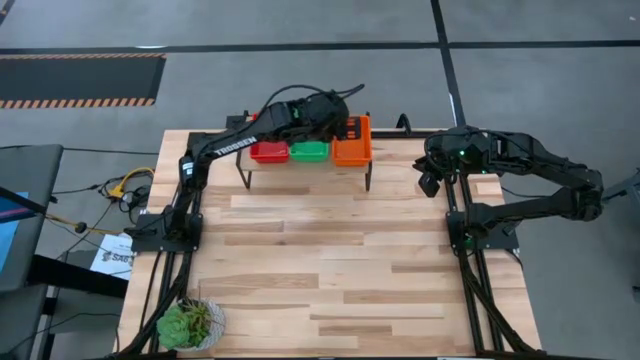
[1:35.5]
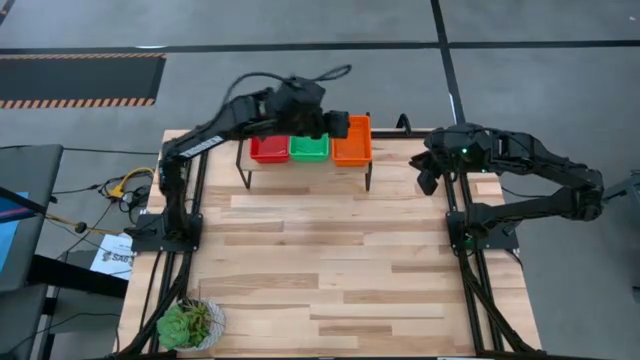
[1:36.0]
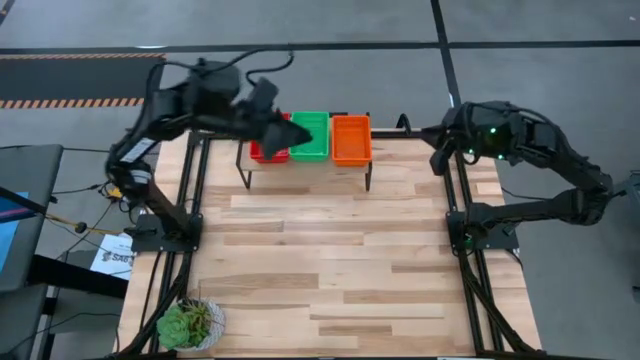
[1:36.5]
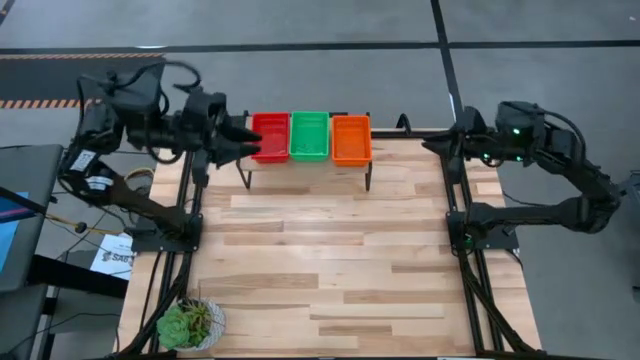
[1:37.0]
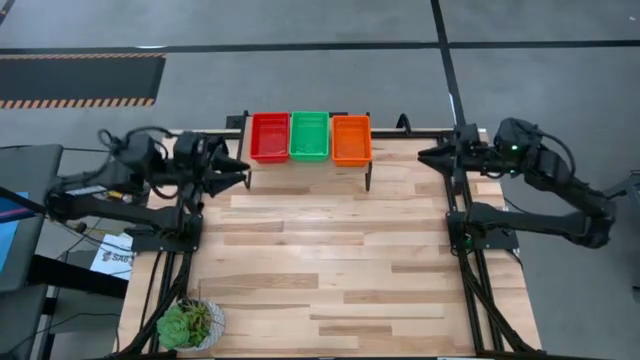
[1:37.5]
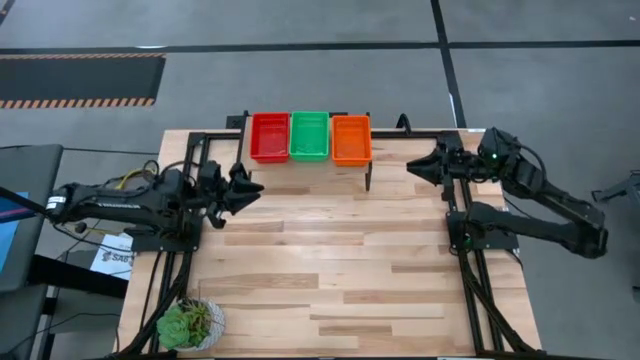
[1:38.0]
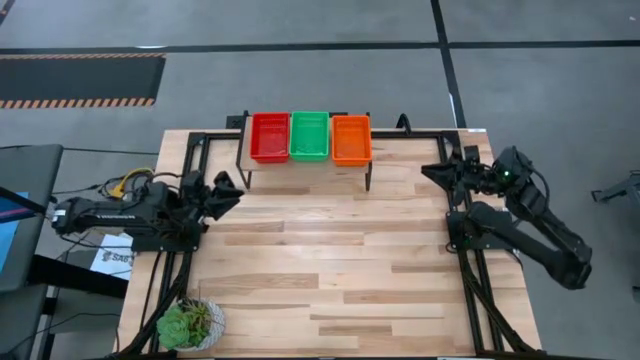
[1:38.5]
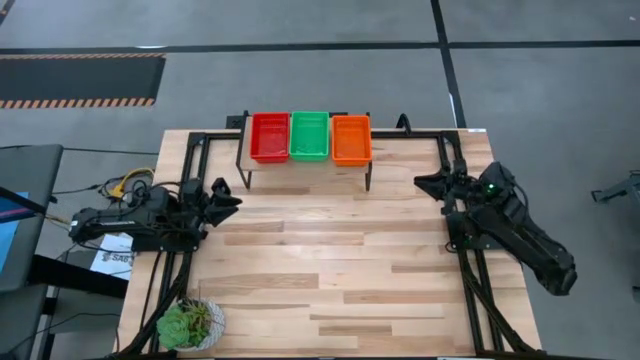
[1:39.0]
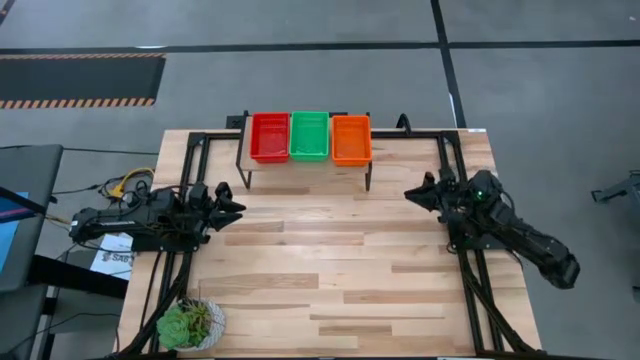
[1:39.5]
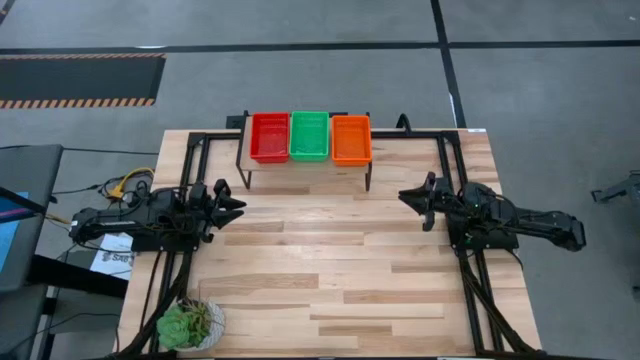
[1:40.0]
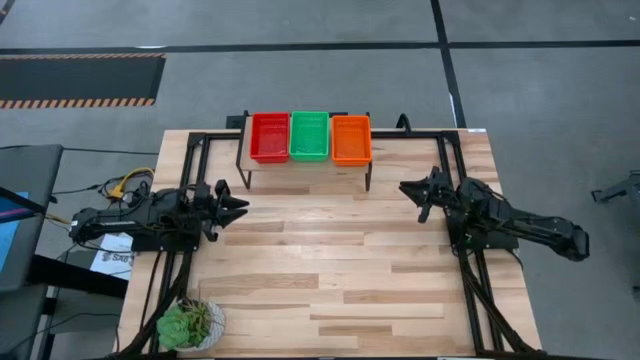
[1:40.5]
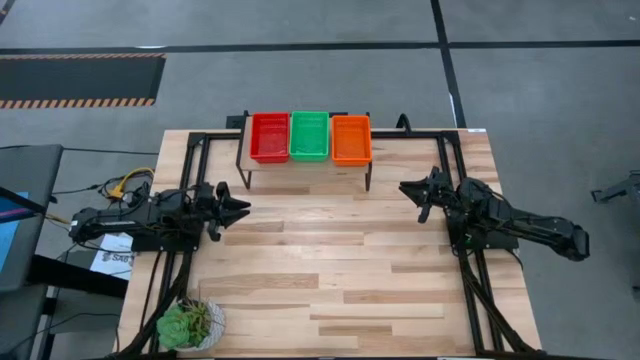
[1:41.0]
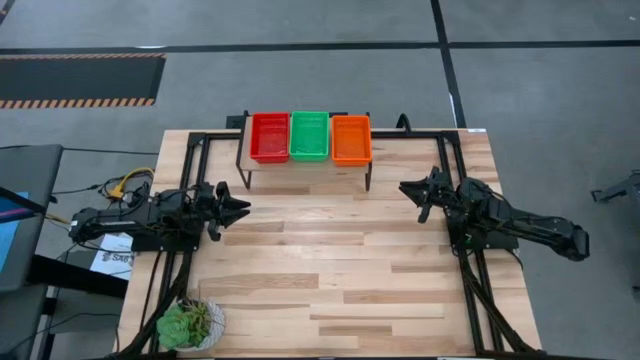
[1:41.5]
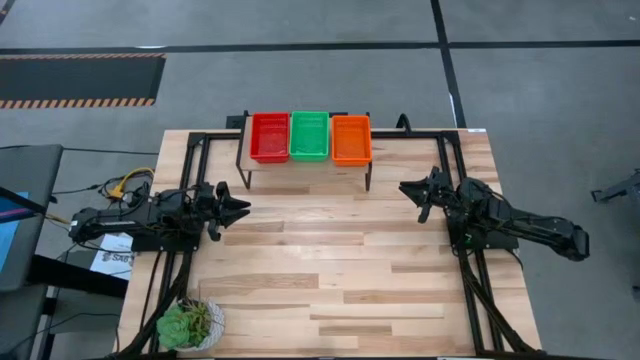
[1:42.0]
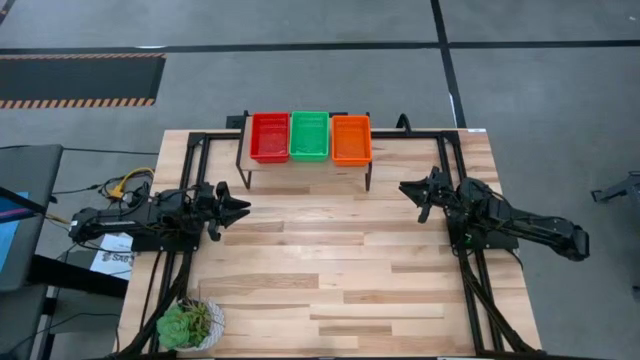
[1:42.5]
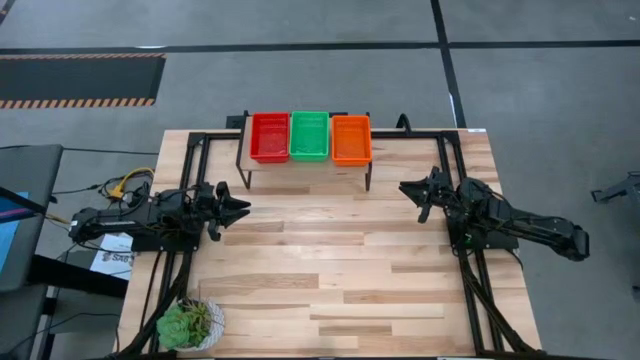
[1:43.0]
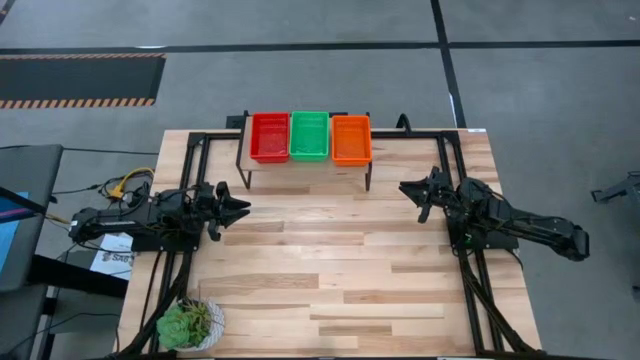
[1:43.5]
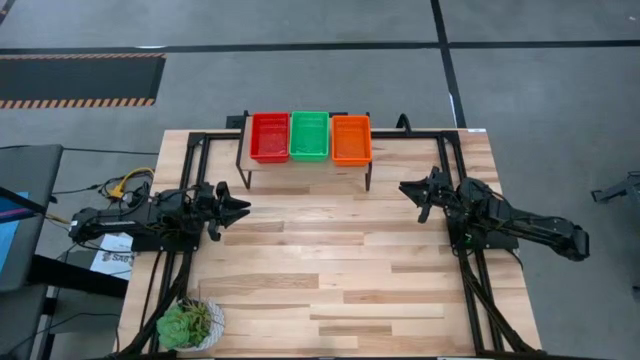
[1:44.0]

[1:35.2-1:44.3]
Task: Stack baskets on shelf by color
Return to Home Position

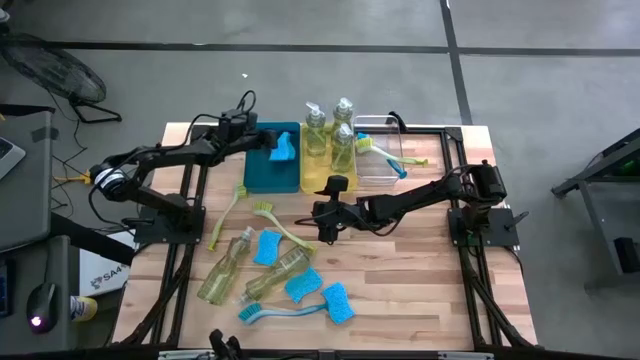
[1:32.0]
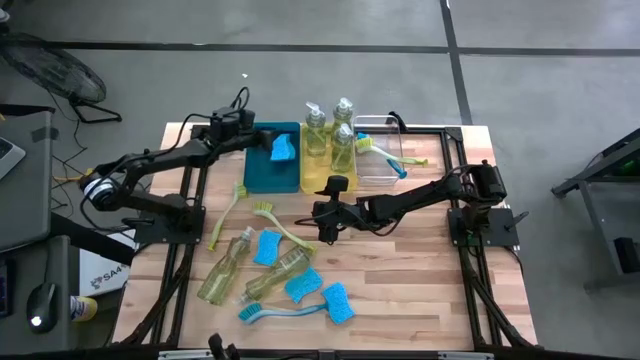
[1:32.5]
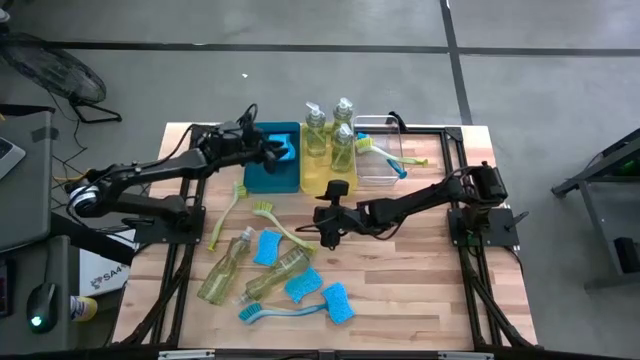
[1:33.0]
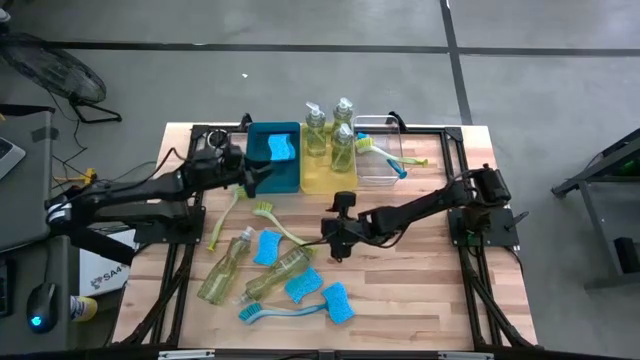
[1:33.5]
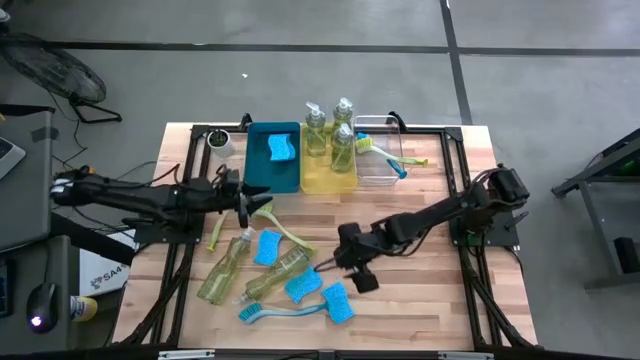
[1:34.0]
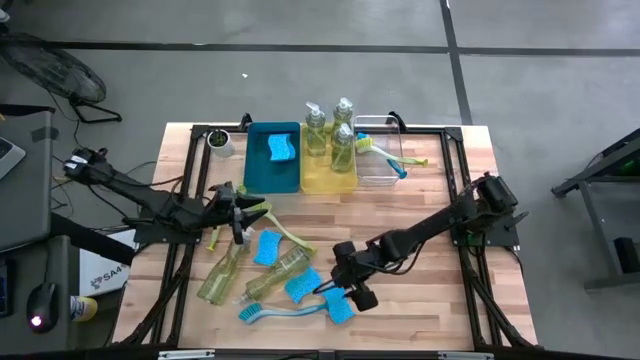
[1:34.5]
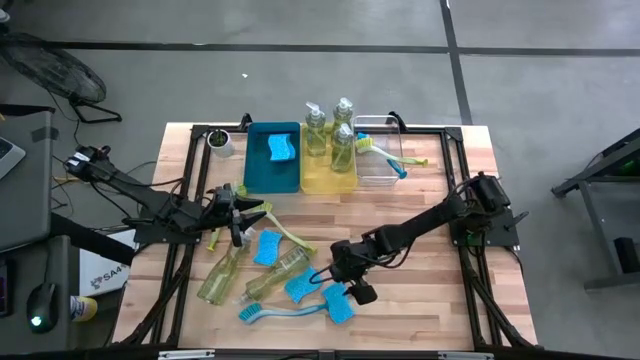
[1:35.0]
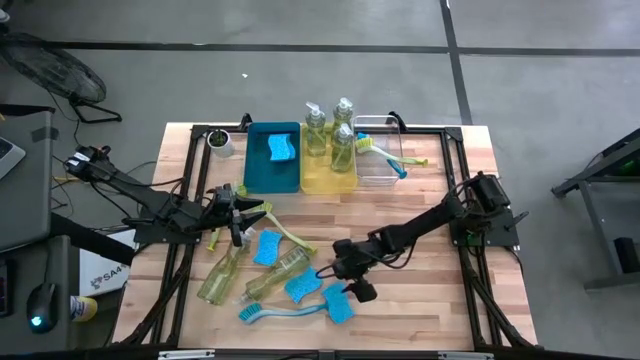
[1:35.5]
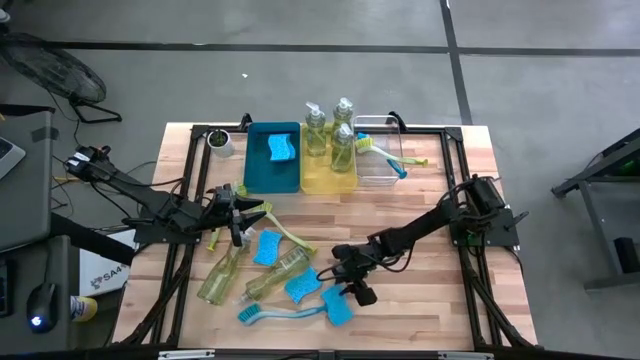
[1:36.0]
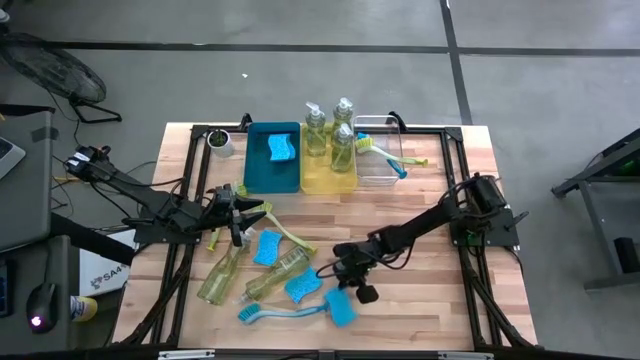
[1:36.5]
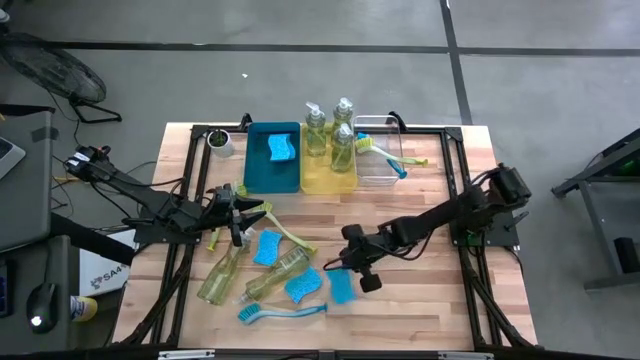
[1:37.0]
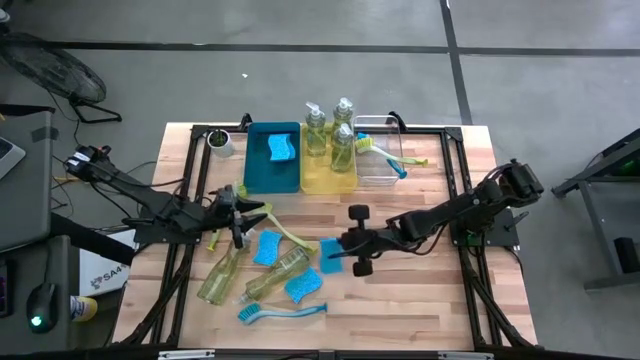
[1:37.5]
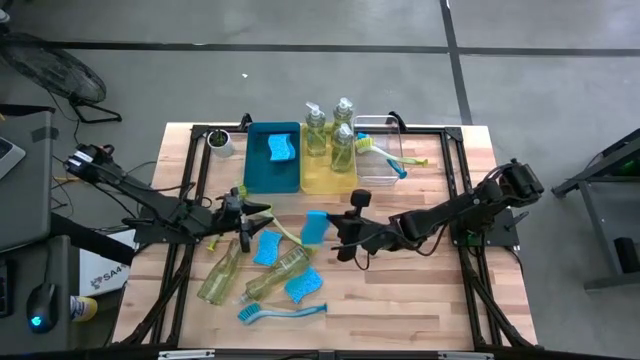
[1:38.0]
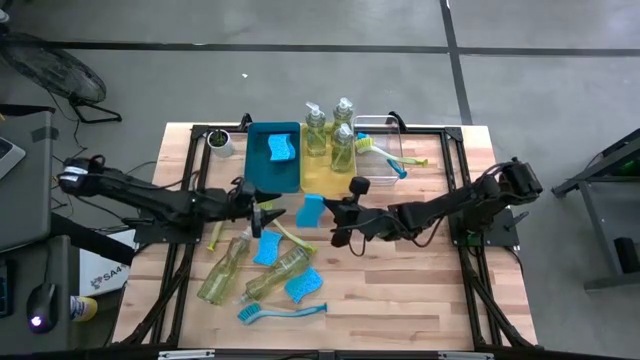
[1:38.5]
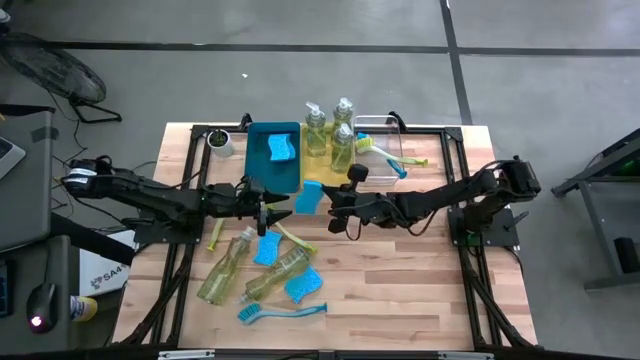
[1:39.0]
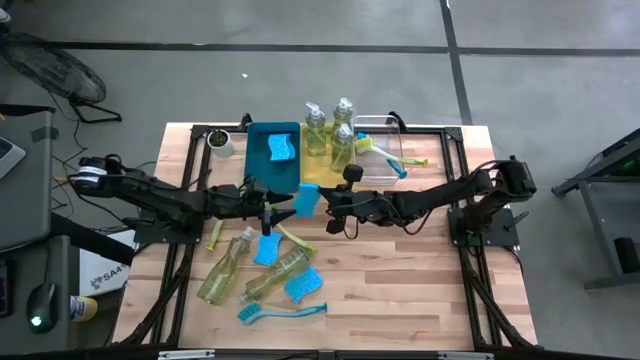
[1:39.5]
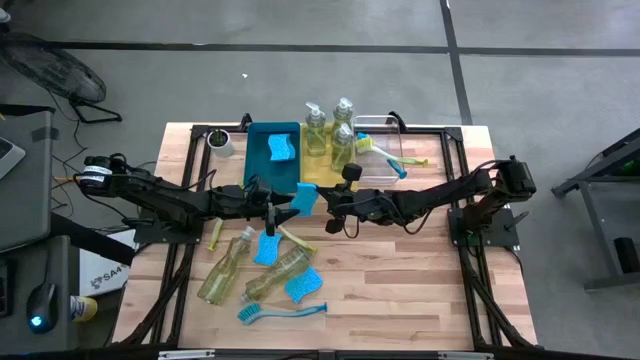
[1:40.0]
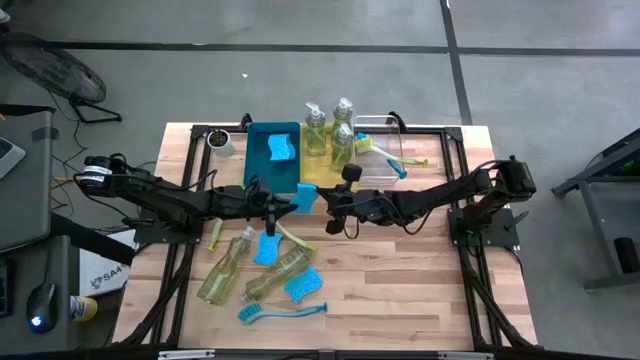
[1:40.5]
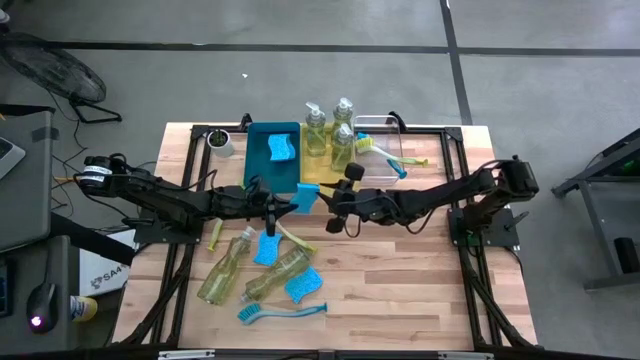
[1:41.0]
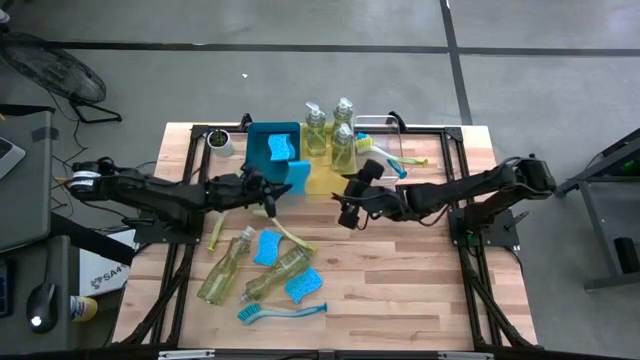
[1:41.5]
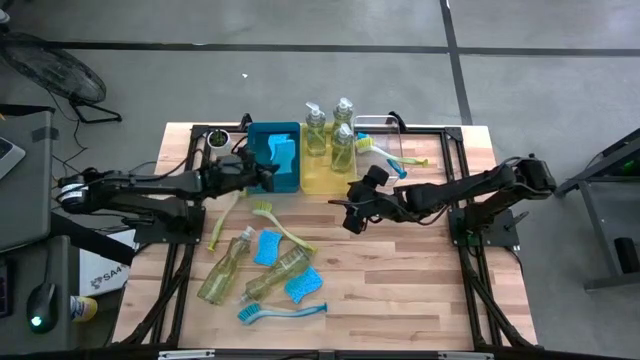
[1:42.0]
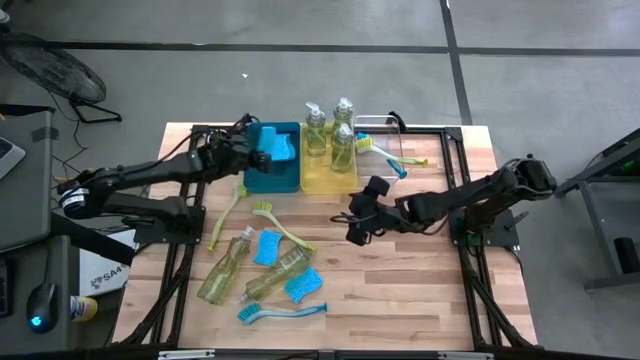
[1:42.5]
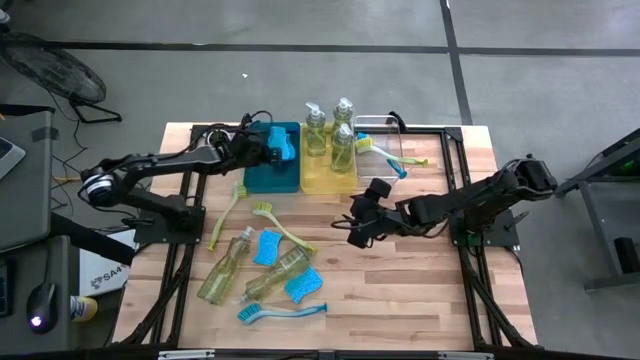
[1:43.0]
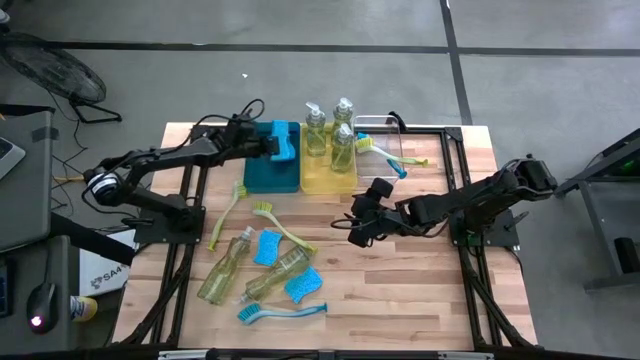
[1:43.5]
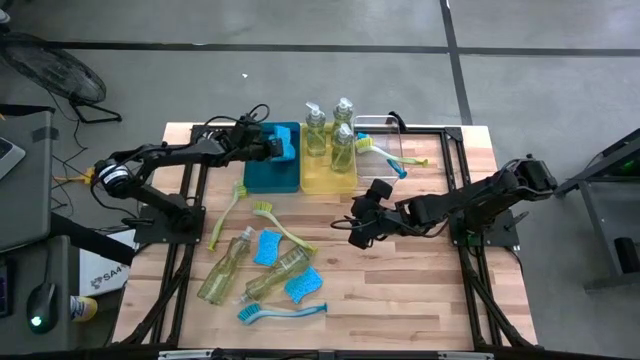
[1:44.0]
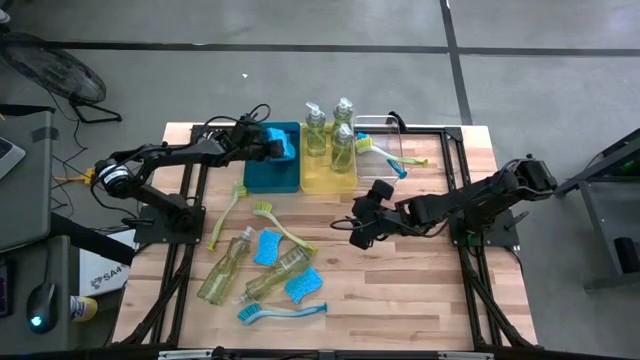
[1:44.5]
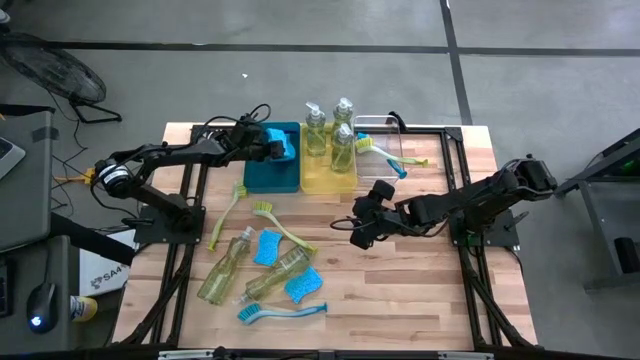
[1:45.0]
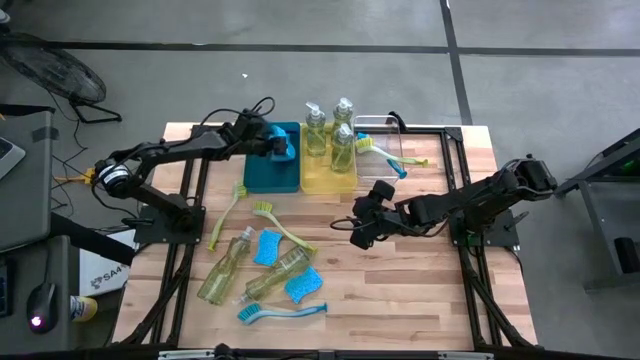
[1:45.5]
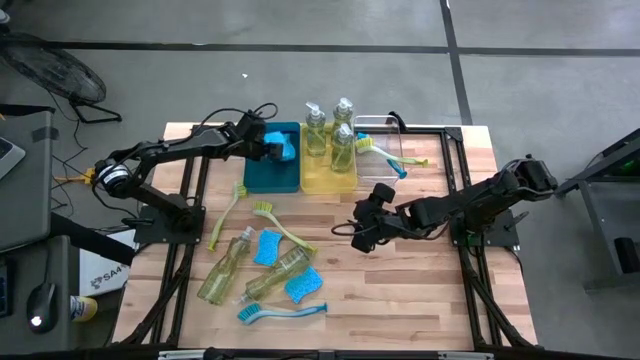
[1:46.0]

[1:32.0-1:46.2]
Task: Pick & Place Kitchen Sink Supplies
Put the blue sponge into the blue bin
